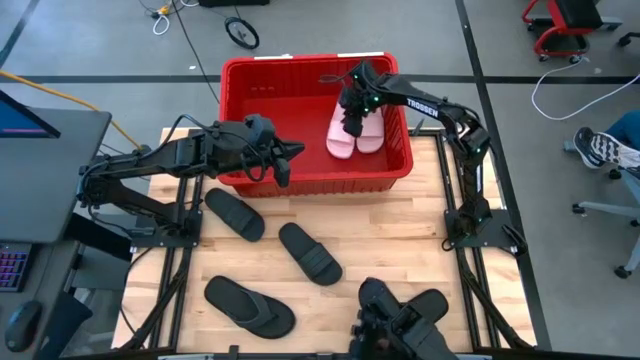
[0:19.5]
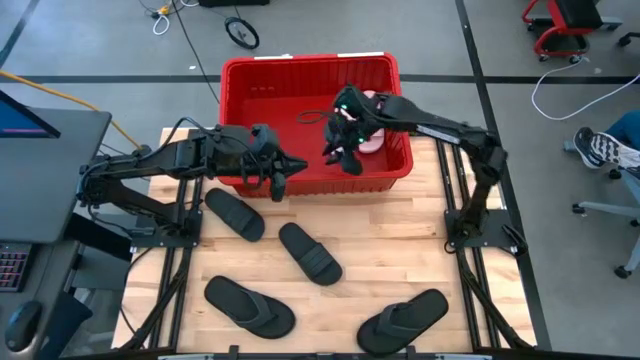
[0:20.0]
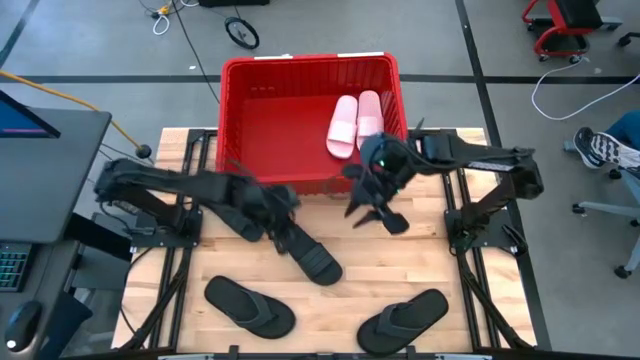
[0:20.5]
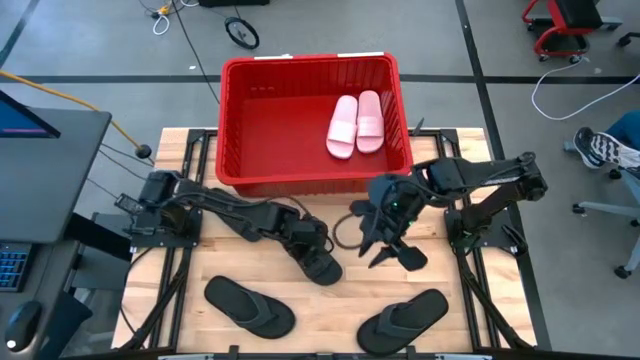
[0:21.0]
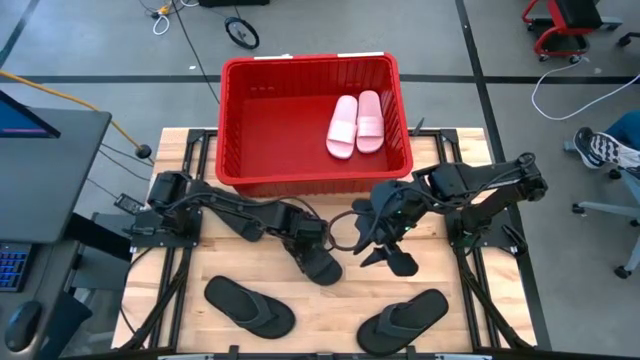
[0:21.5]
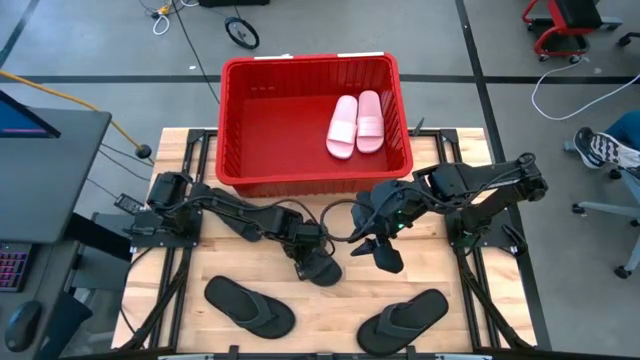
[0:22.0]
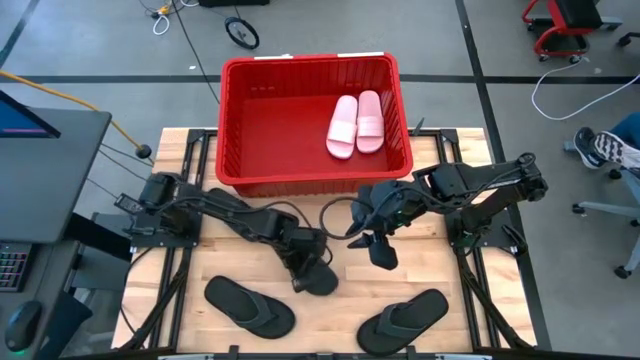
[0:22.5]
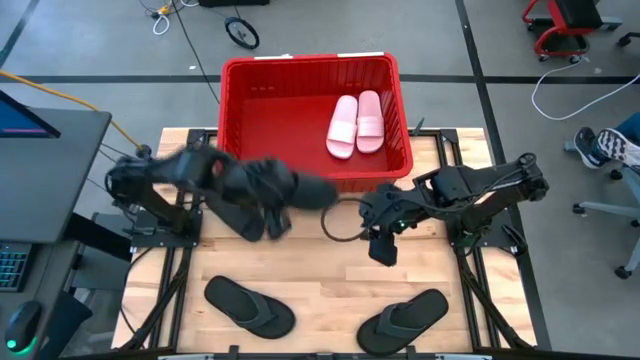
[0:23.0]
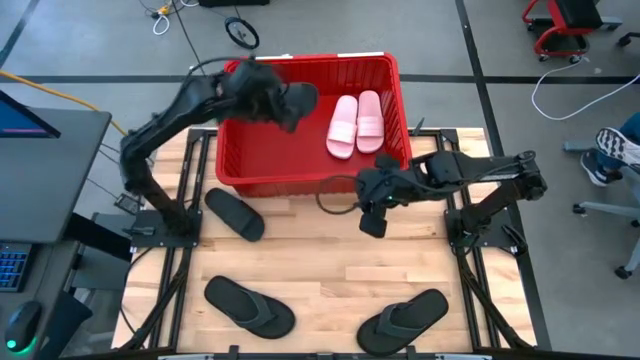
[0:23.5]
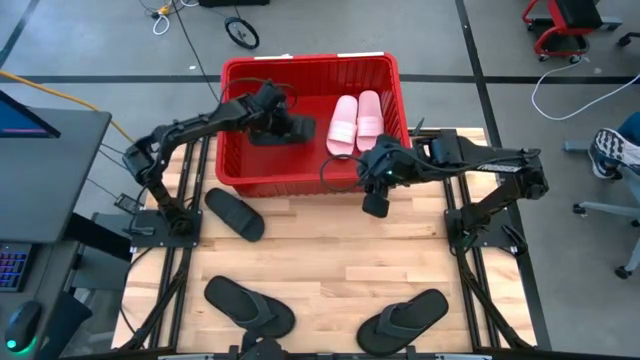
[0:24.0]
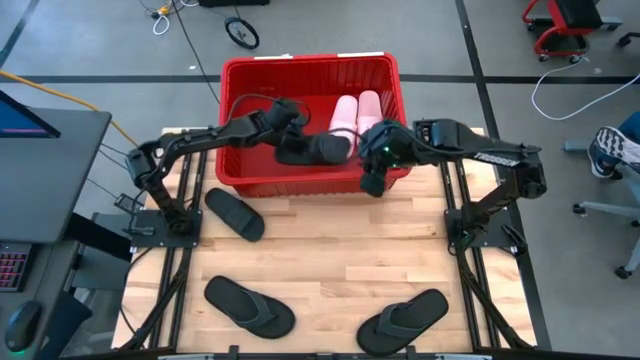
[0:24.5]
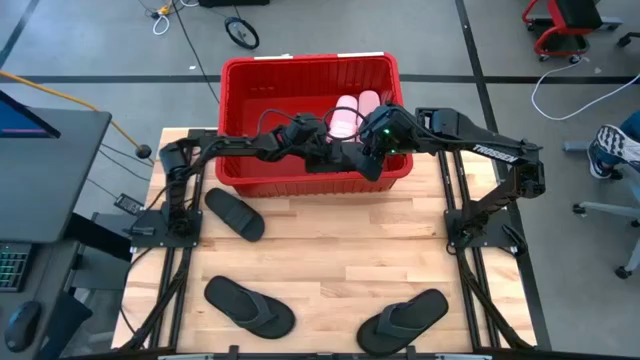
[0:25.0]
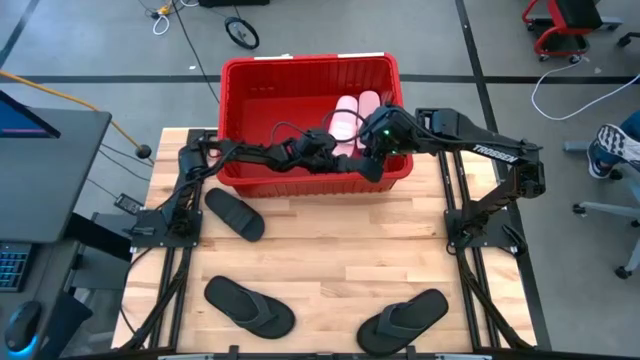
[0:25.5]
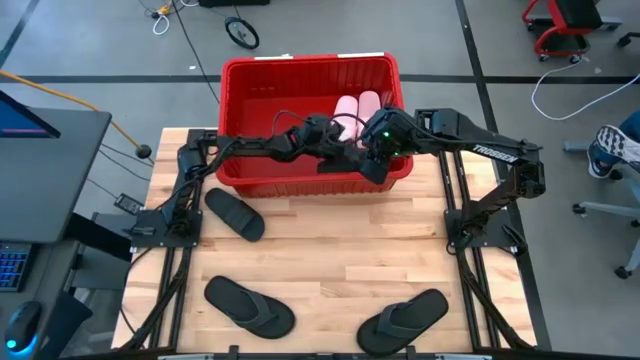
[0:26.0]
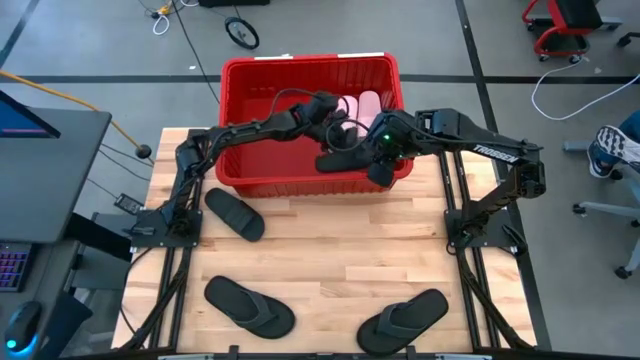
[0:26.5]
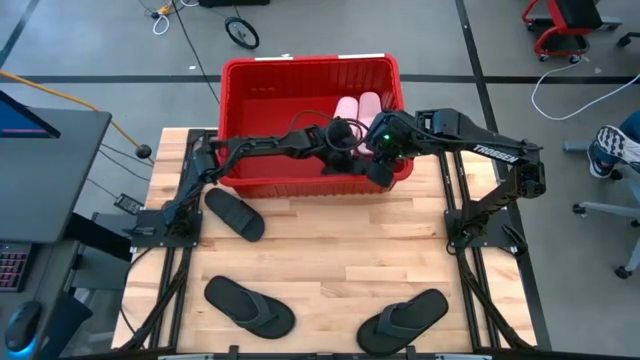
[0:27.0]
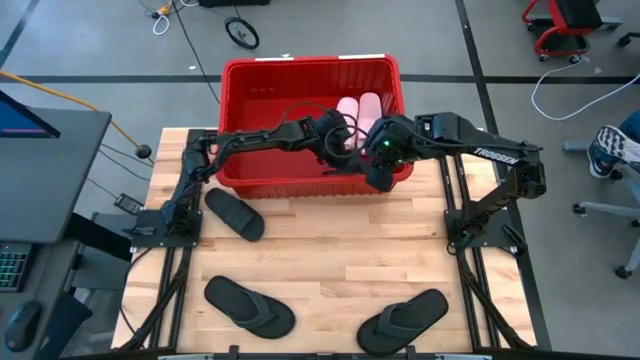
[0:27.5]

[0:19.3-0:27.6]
Task: Pick and place slides into bin
Put the right black slide into the red bin

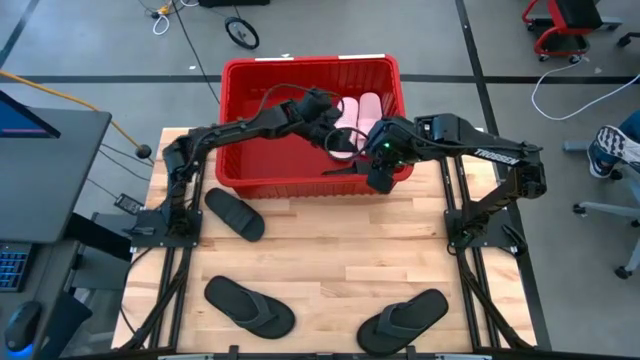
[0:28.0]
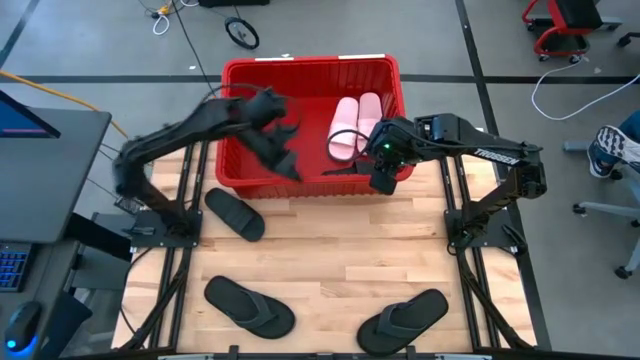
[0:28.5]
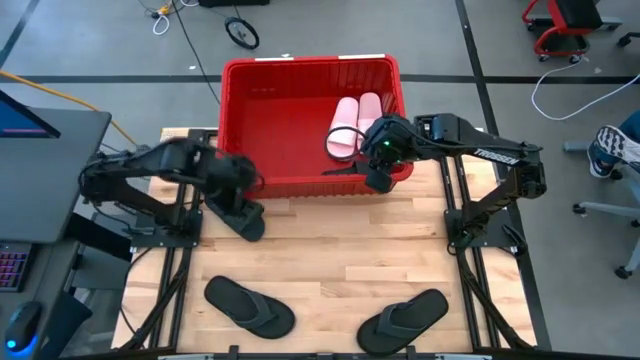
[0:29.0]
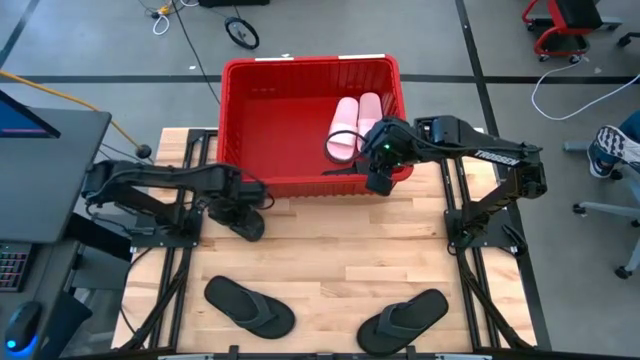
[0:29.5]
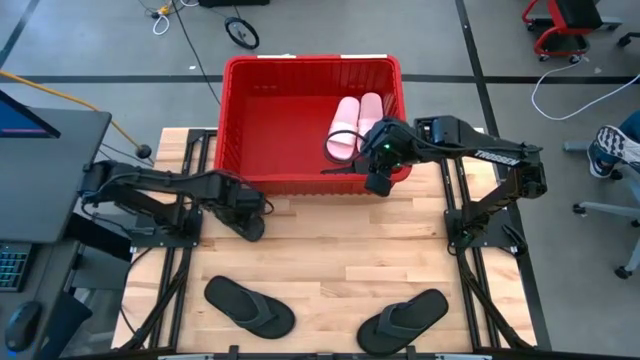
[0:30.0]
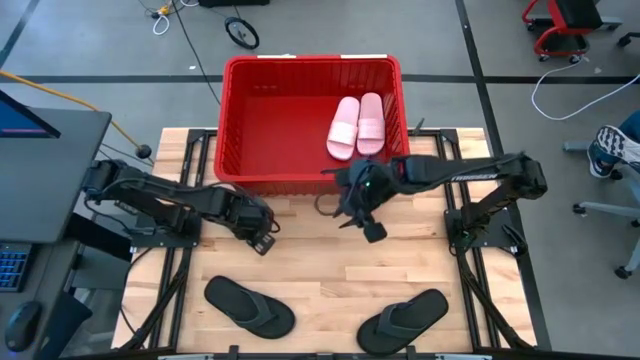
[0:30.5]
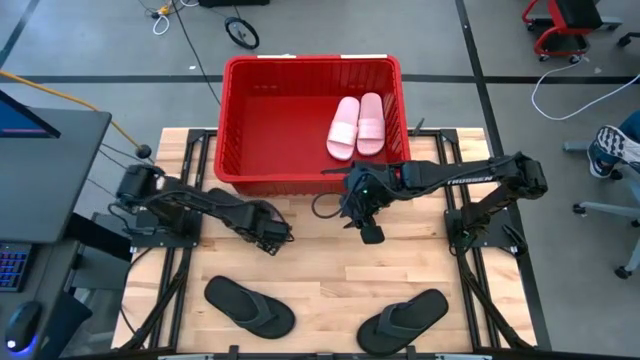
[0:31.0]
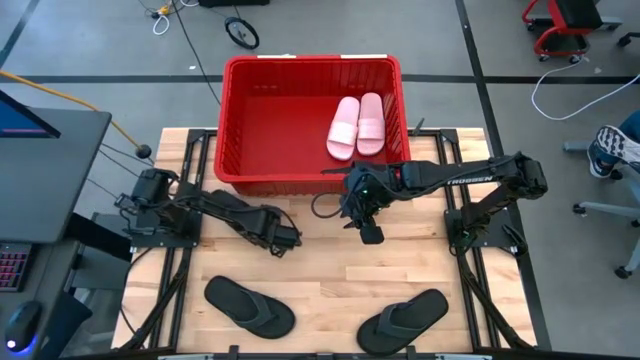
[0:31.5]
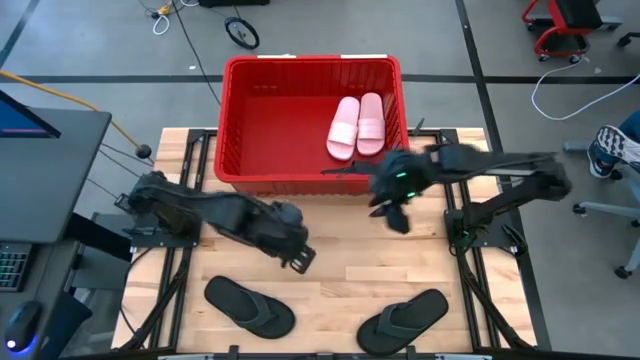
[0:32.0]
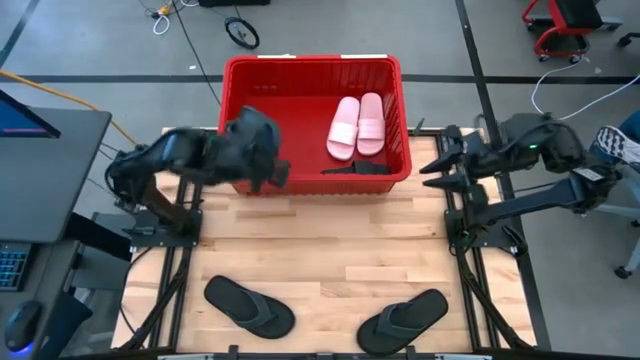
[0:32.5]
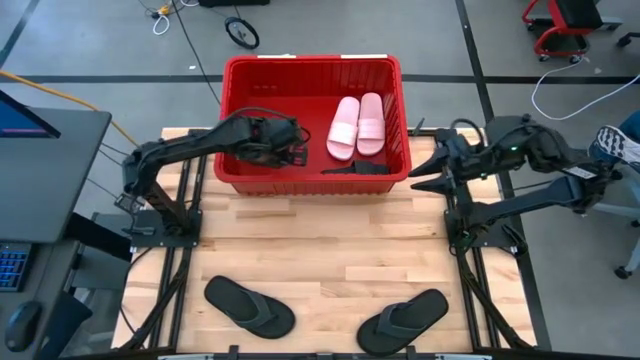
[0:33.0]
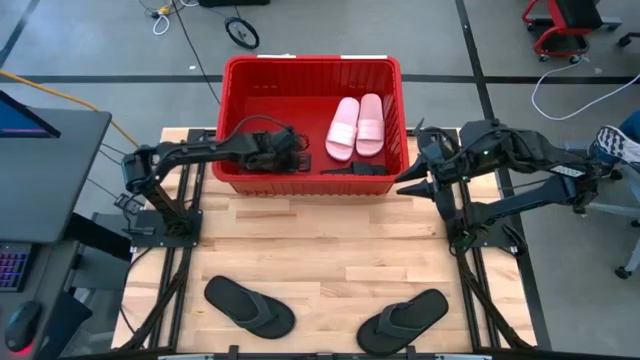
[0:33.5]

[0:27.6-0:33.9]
Put the black slide into the red bin

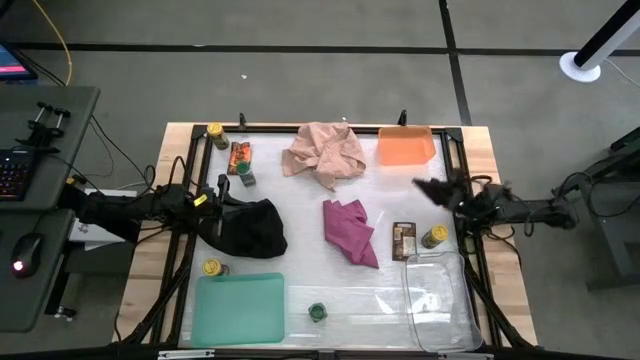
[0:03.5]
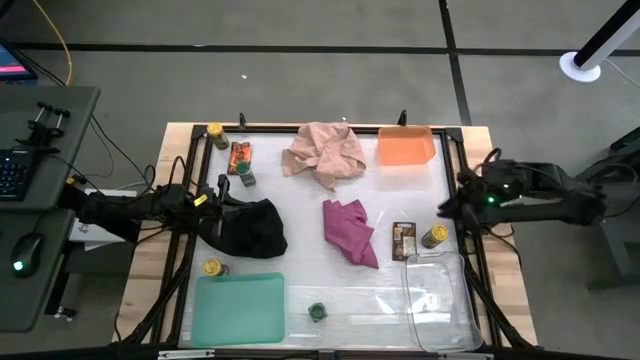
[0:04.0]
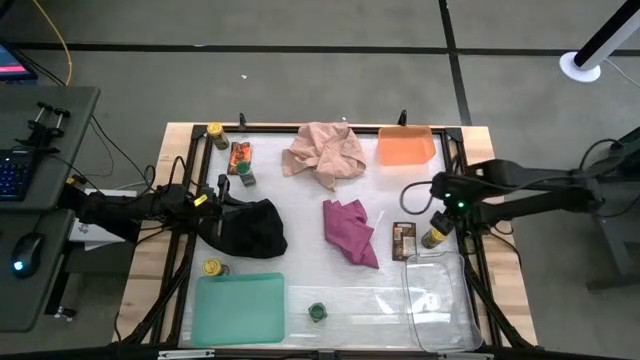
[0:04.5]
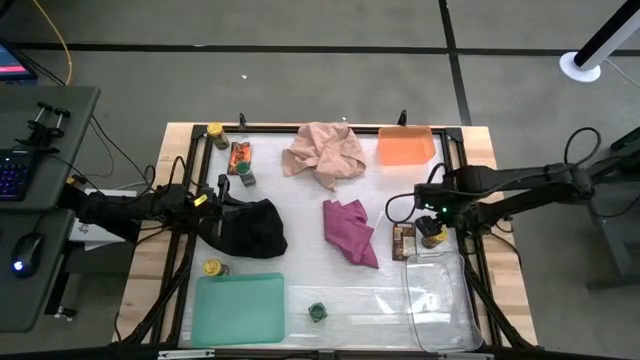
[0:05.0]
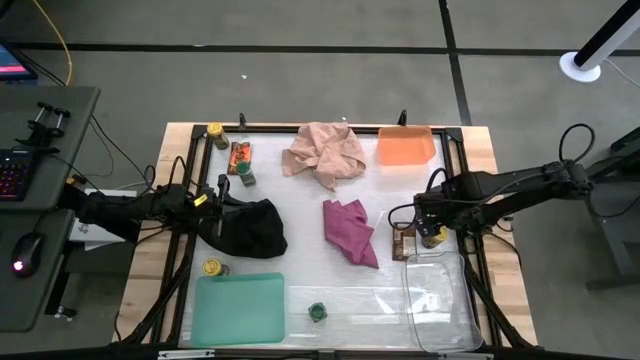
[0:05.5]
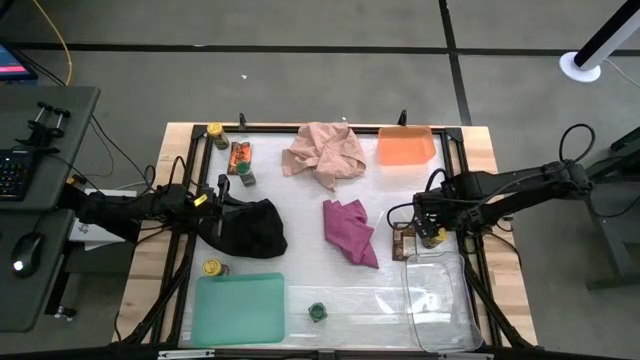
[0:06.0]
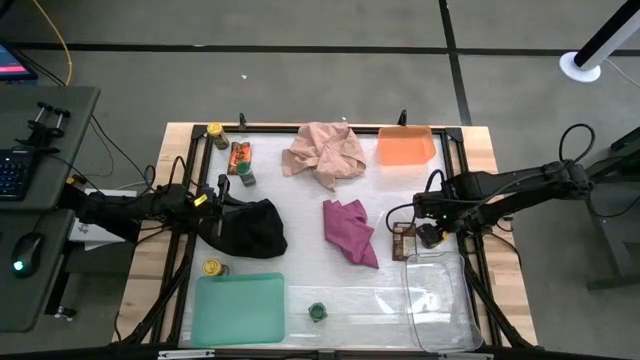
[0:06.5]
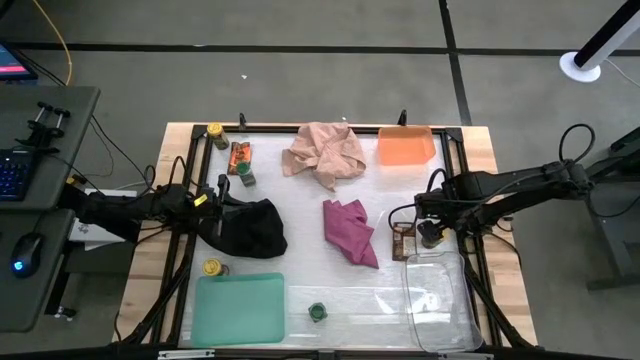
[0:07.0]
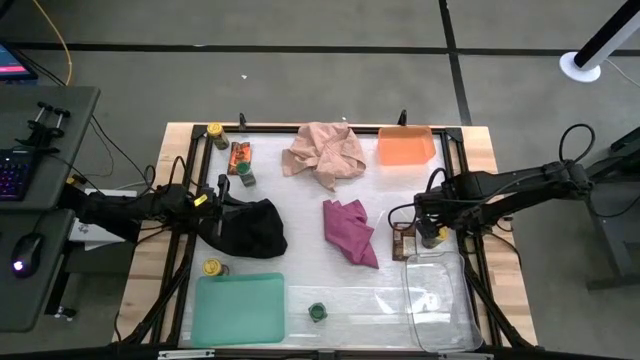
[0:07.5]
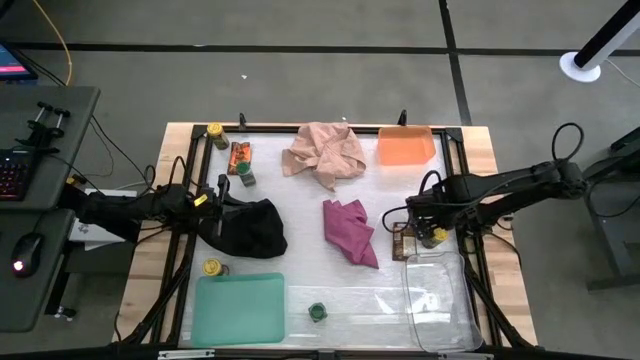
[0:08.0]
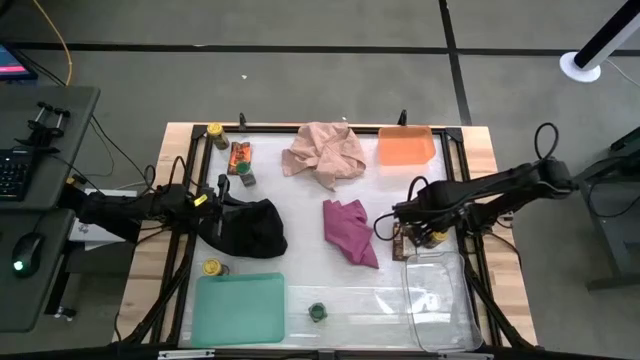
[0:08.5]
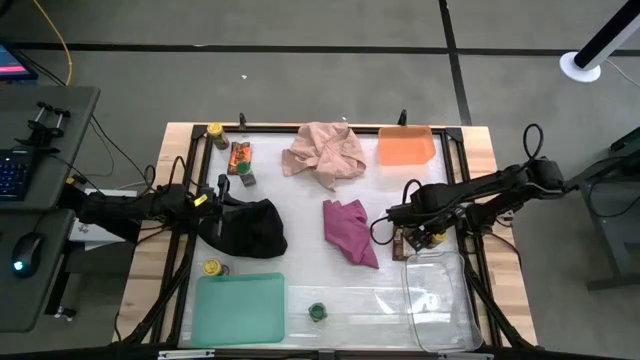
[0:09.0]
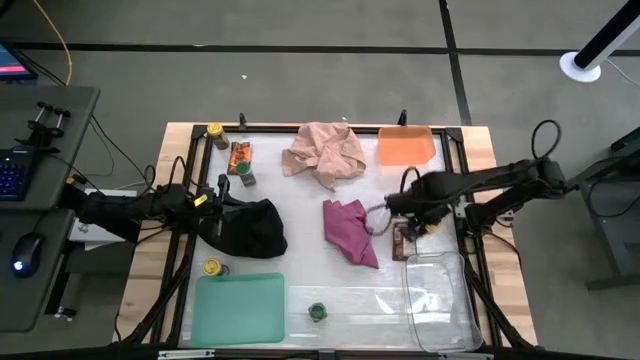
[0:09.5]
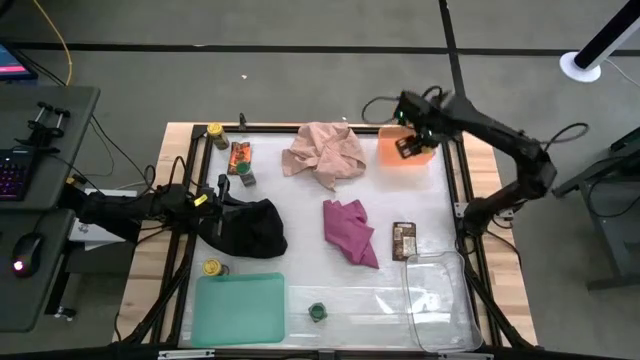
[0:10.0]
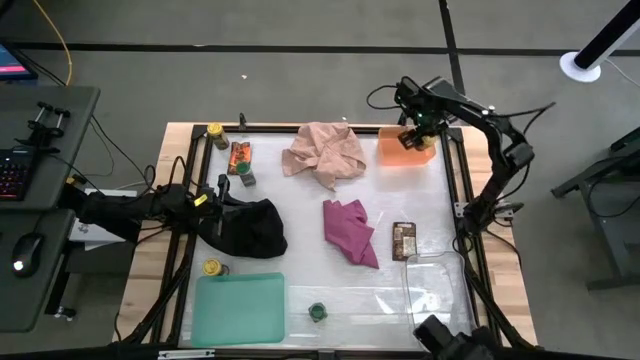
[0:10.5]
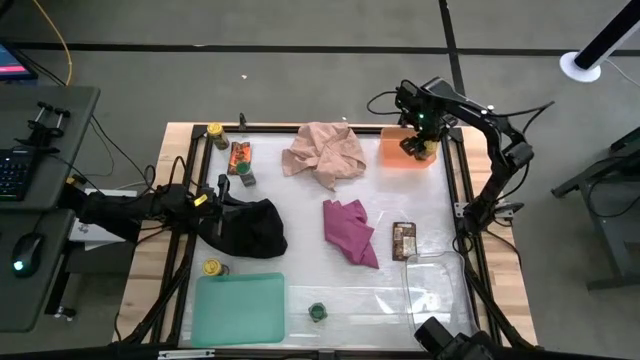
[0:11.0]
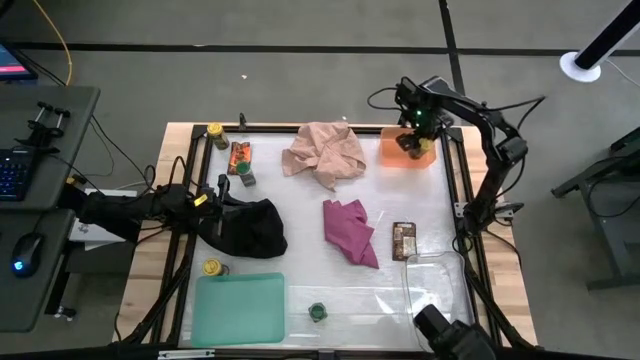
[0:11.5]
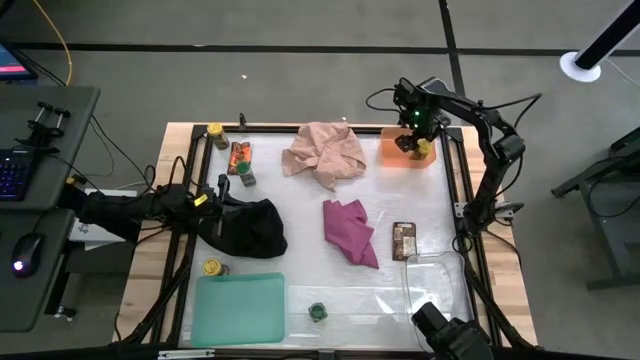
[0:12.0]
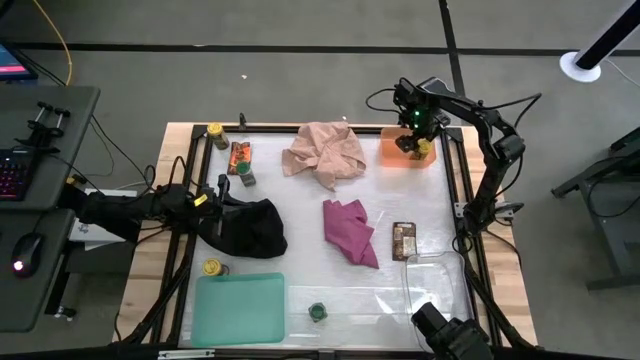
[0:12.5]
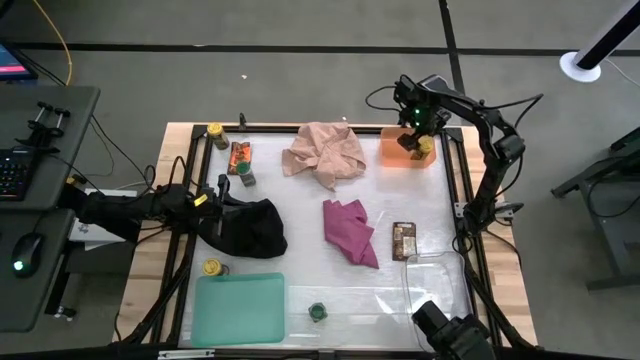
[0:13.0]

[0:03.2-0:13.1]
Task: Sort spices by type
Put the bottom right yellow seasoning bottle into the orange bin
